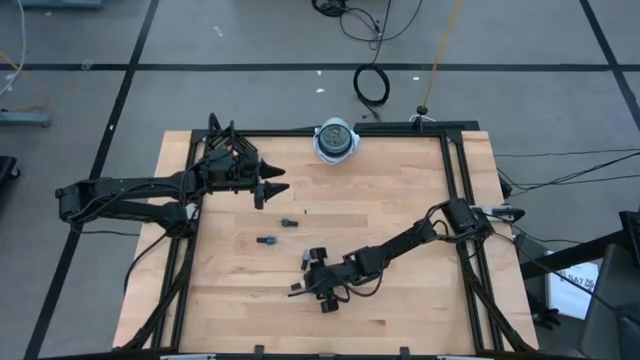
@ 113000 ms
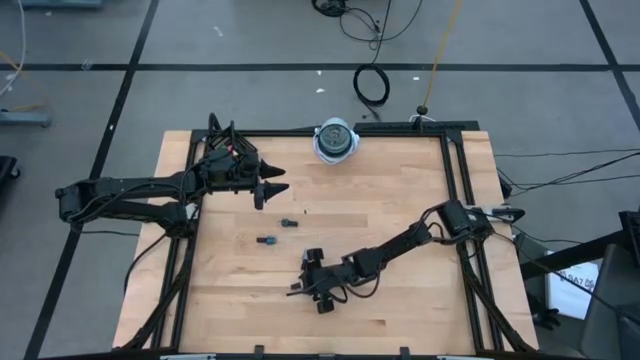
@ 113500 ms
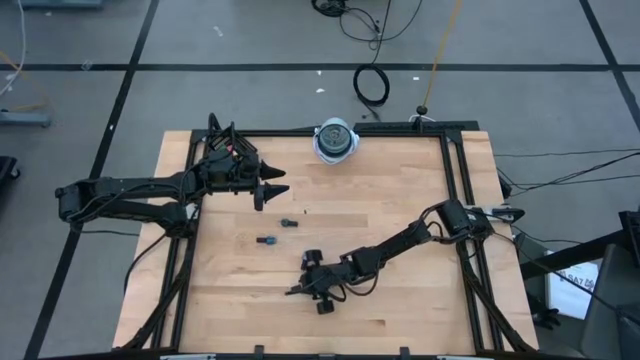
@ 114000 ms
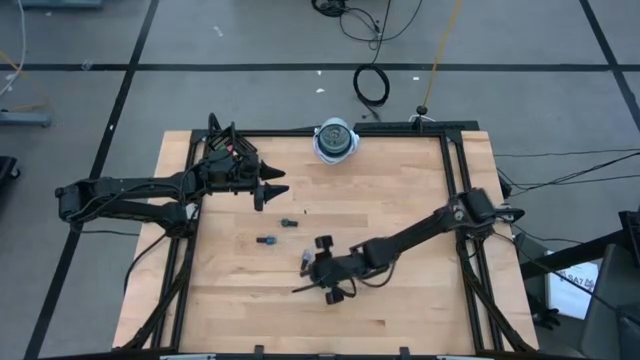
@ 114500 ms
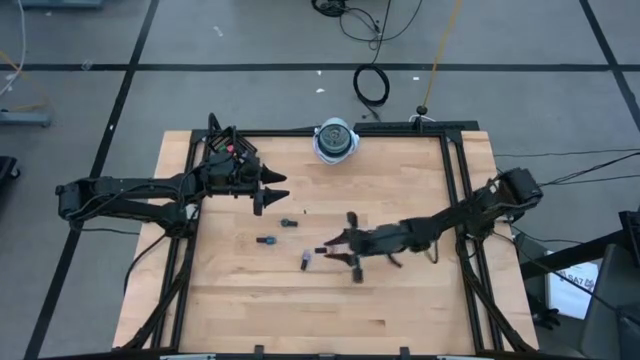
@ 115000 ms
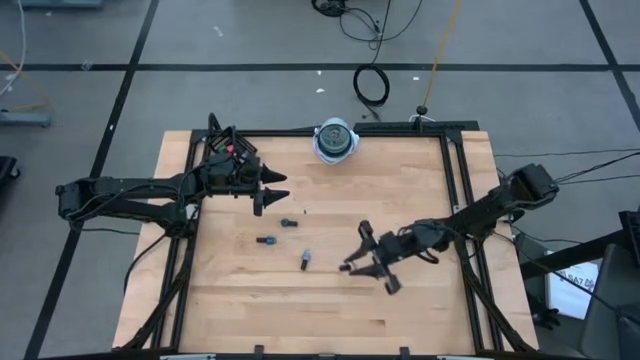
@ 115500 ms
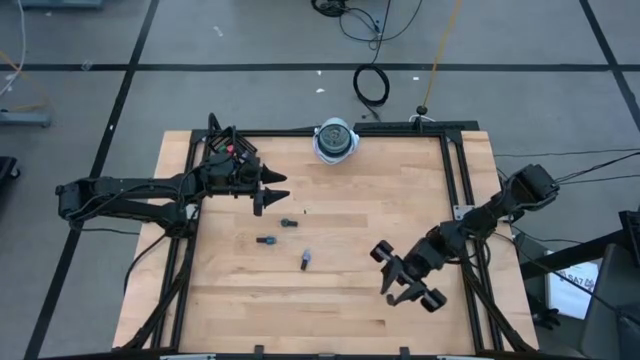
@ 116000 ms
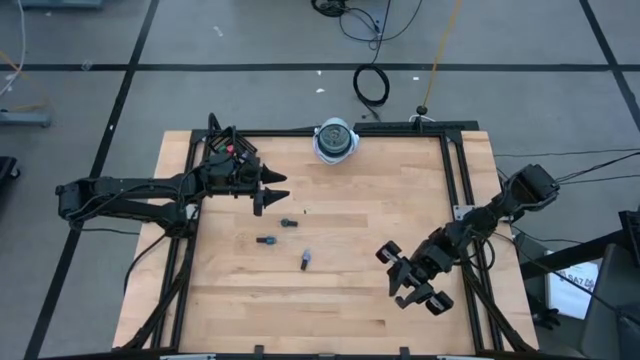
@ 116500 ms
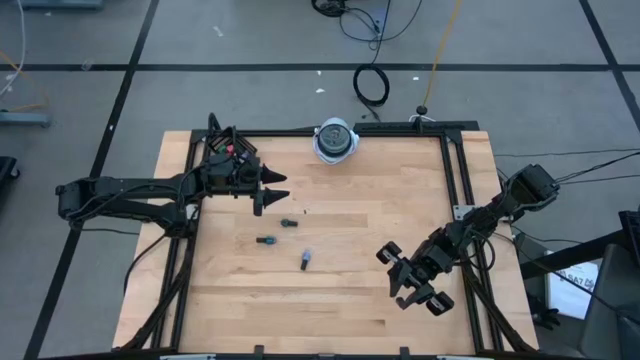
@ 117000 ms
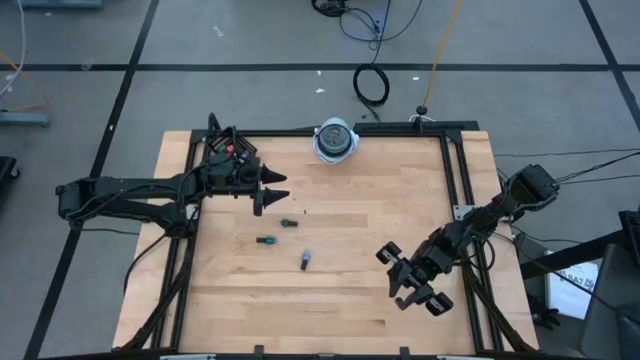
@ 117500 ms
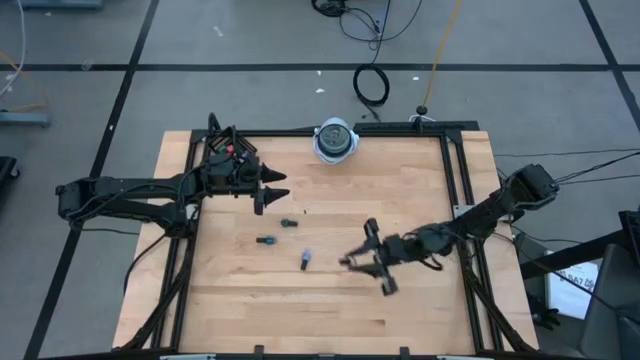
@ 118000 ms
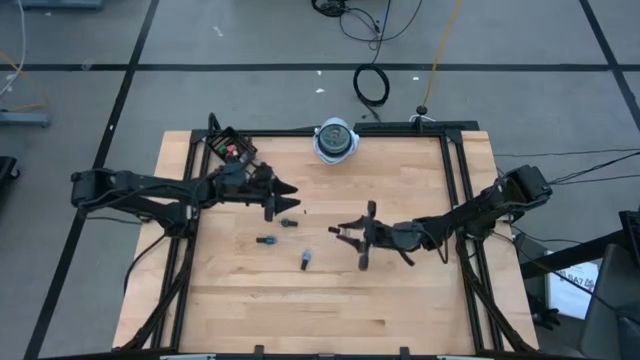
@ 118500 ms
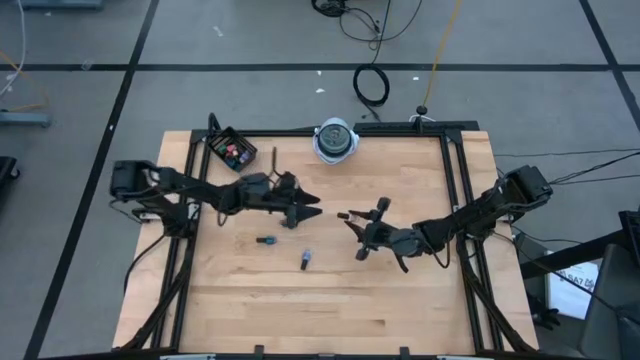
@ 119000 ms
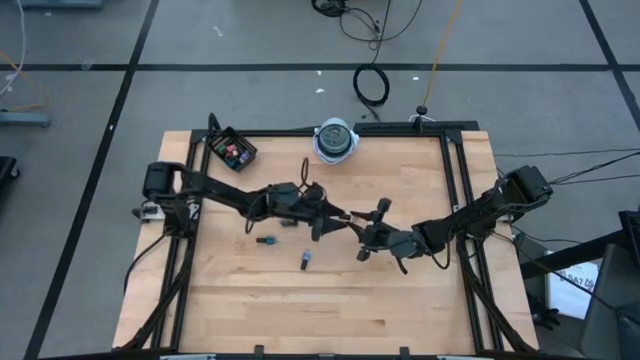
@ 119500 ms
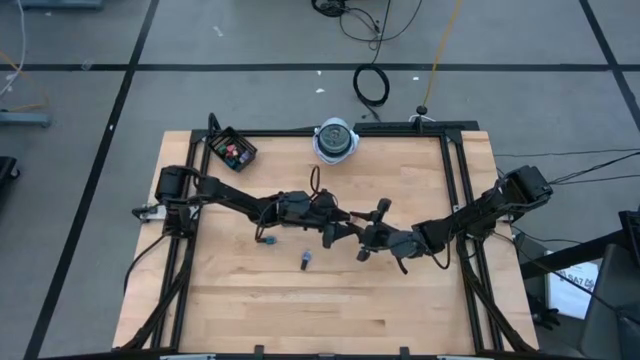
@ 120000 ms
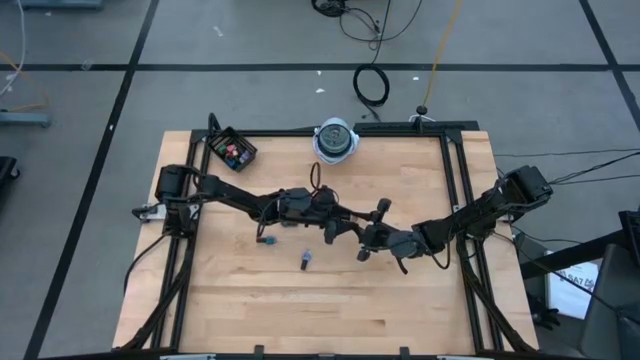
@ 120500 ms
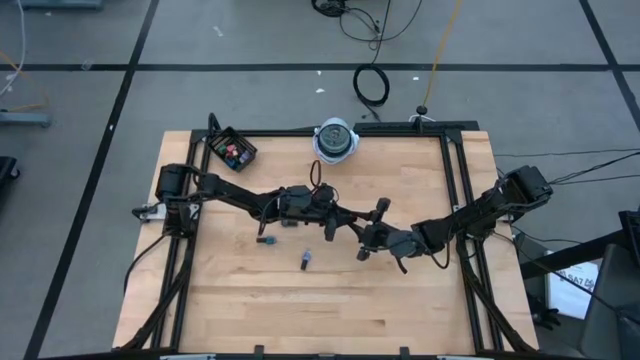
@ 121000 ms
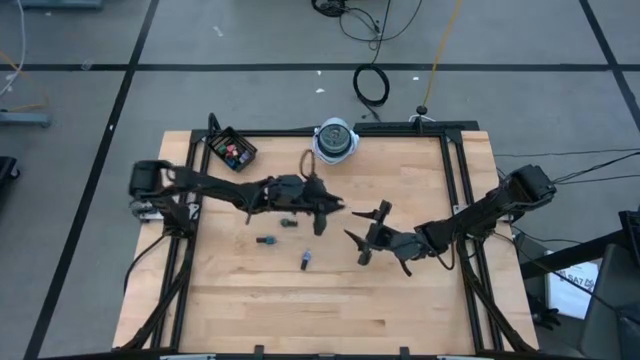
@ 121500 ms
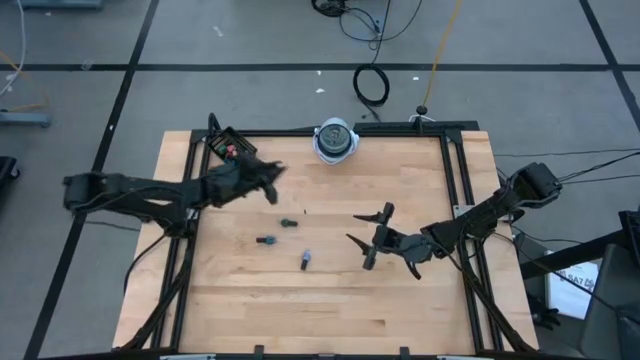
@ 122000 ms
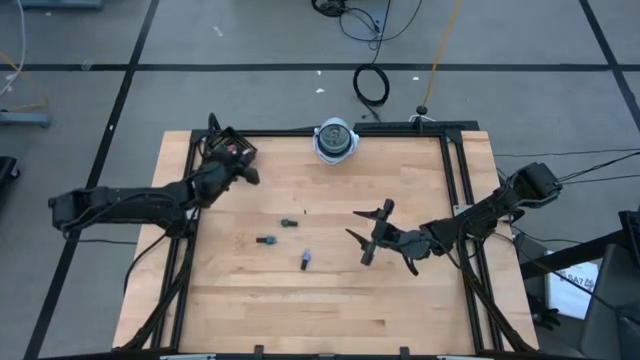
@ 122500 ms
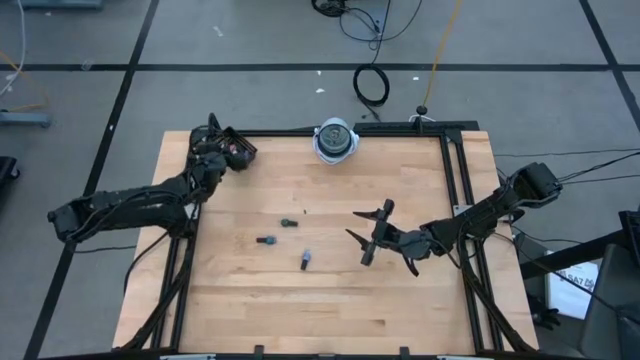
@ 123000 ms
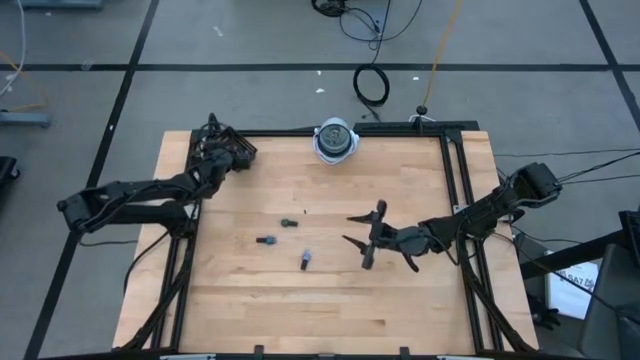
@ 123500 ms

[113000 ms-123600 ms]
Task: Pick & Place Nail Polish
Put the light orange nail polish bottle into the black bin

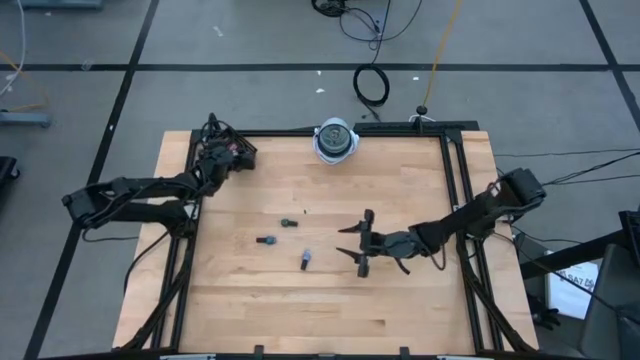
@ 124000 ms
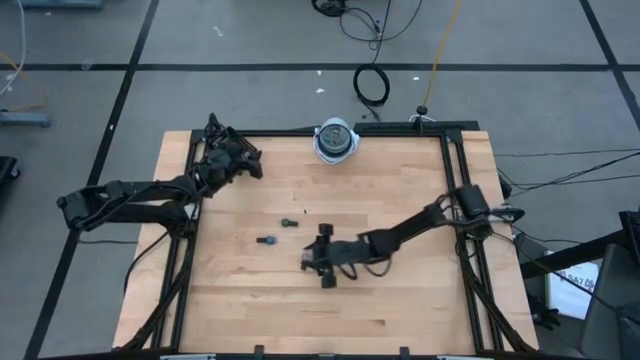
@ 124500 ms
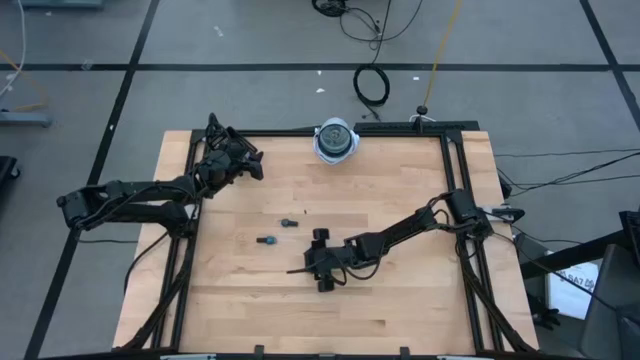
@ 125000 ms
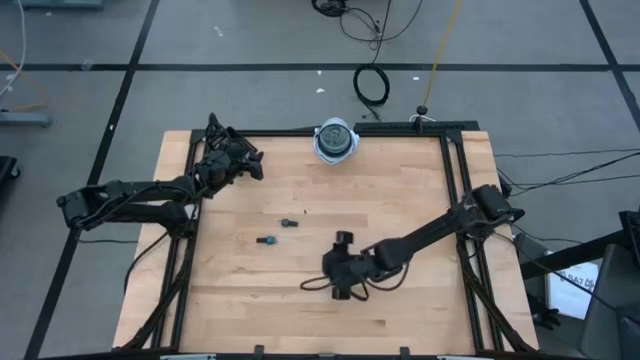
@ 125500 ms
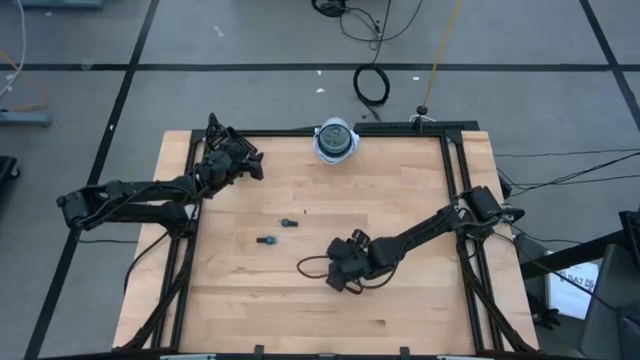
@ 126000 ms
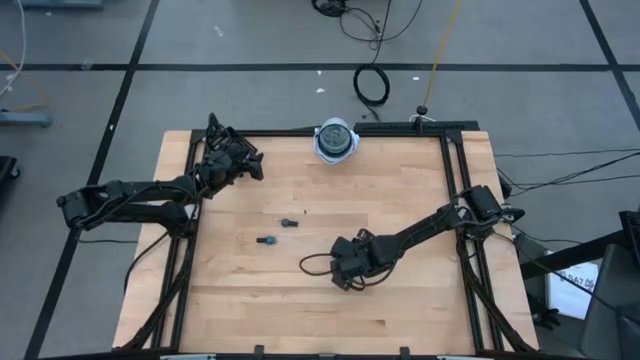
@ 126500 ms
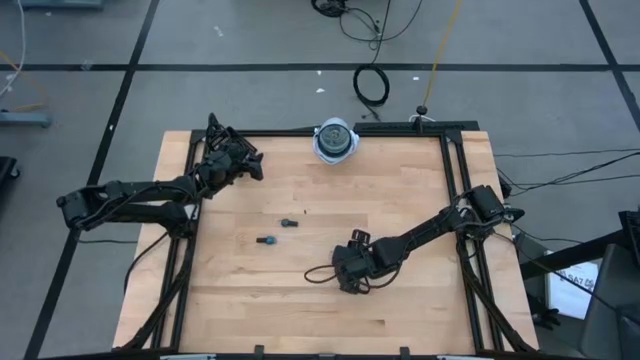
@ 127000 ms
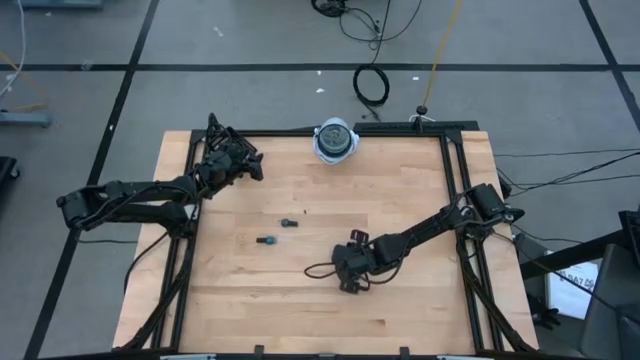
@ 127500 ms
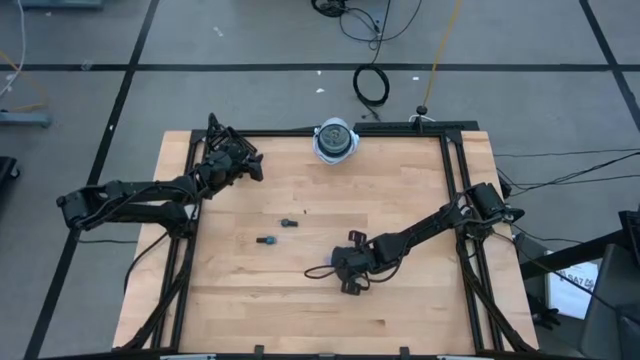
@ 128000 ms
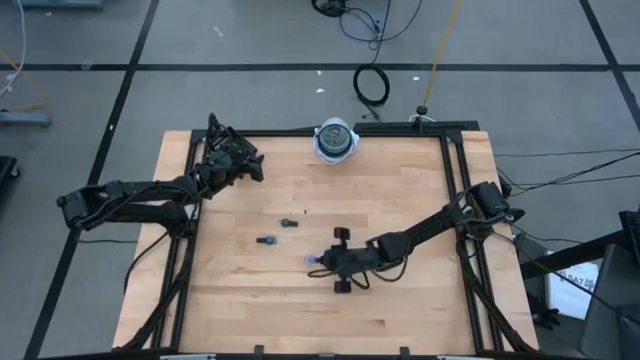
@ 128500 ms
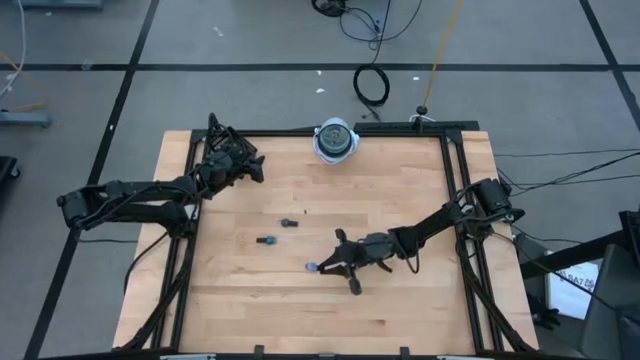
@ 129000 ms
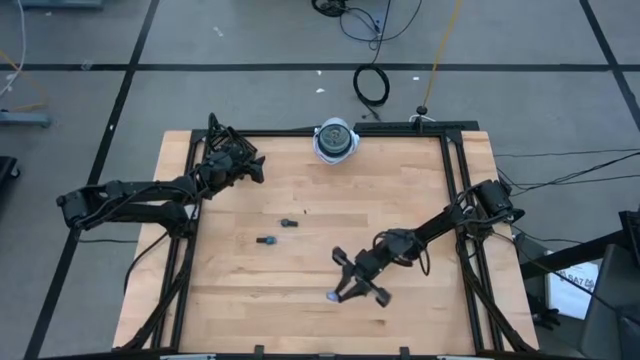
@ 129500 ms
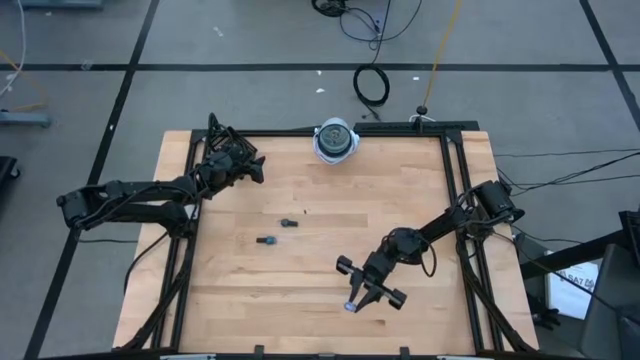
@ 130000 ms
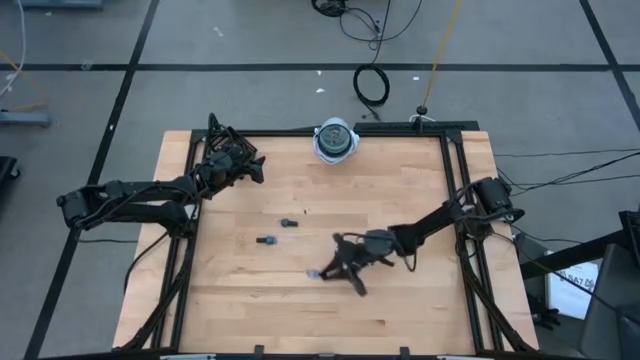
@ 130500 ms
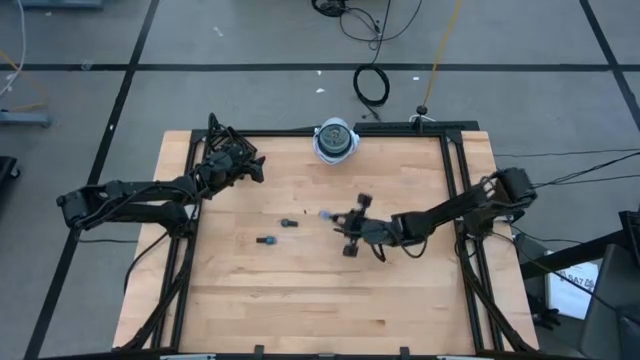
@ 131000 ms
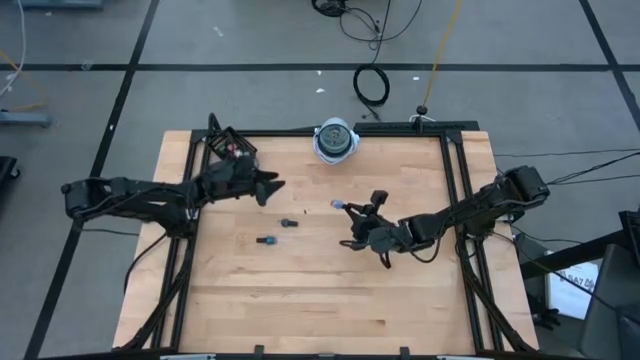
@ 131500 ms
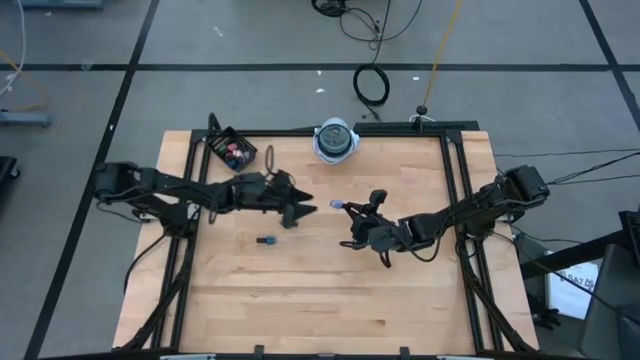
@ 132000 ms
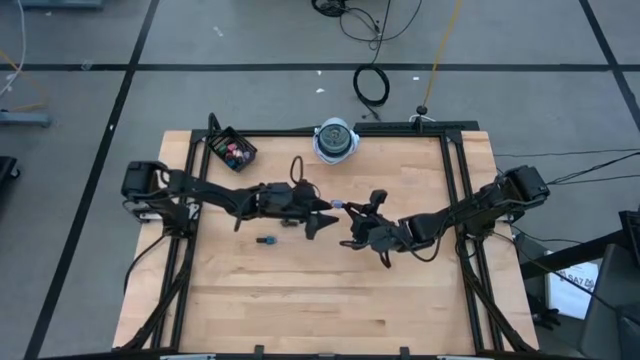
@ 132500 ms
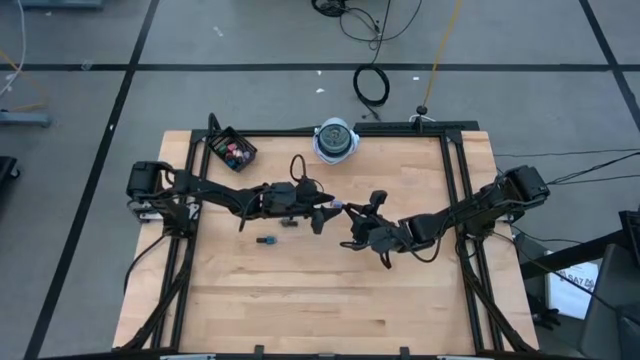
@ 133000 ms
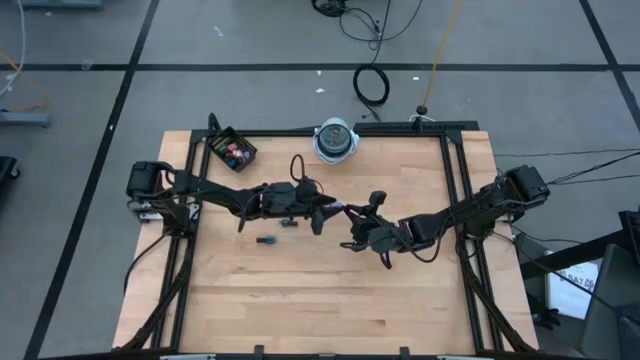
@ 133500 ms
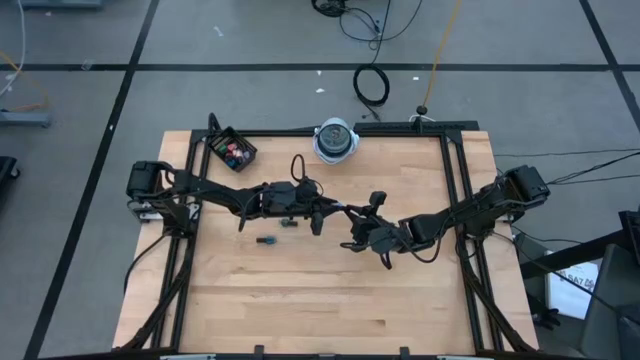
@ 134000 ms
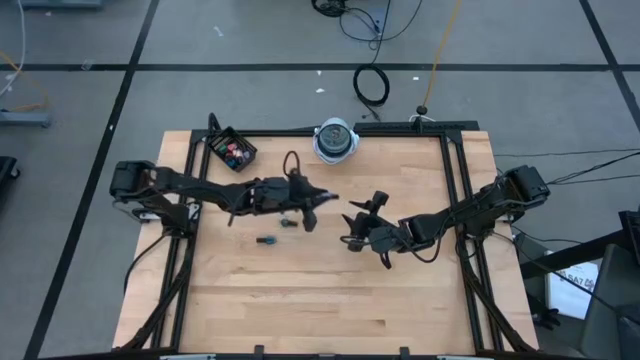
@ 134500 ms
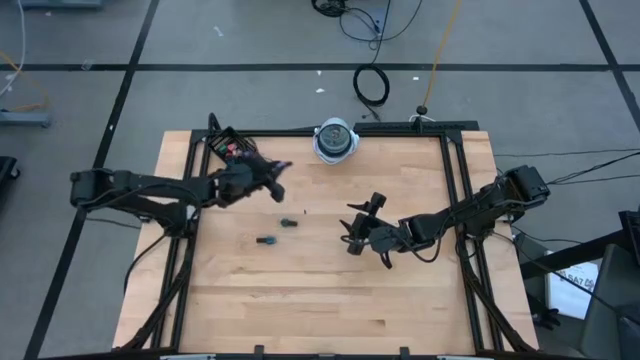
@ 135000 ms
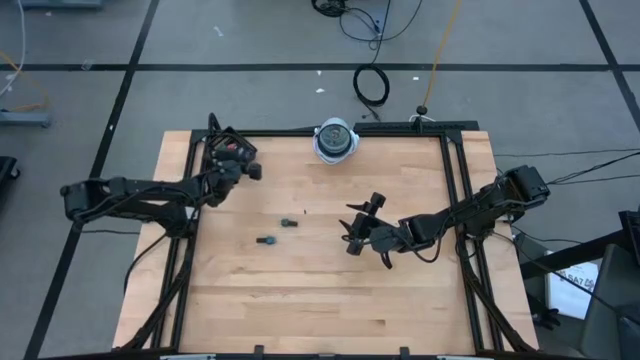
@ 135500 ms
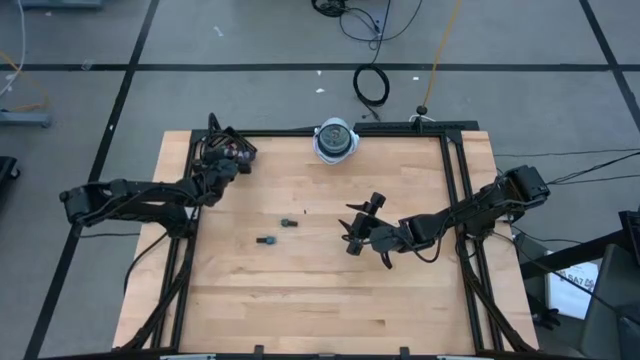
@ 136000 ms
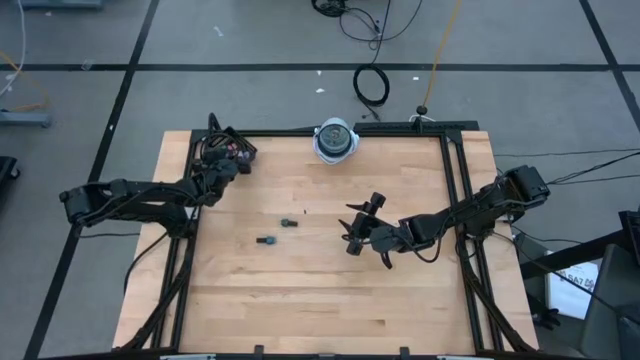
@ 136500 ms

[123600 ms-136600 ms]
Put the light blue nail polish bottle into the black bin
